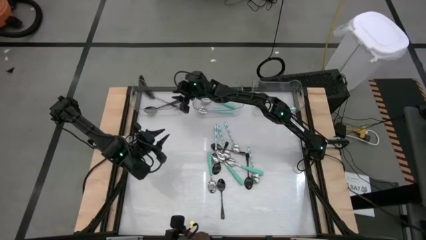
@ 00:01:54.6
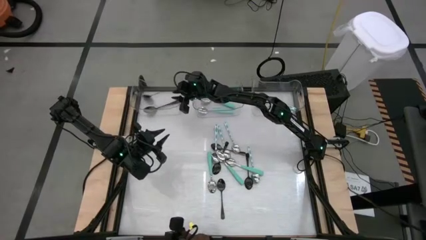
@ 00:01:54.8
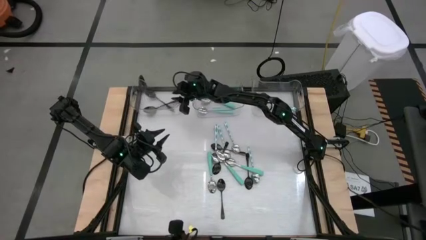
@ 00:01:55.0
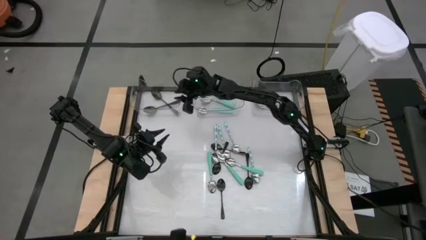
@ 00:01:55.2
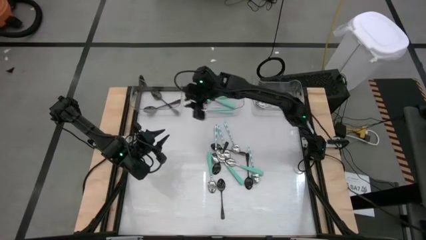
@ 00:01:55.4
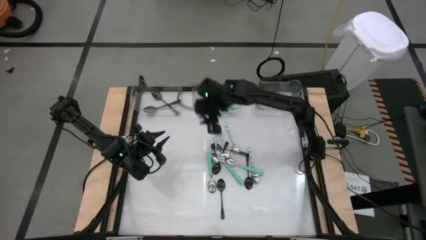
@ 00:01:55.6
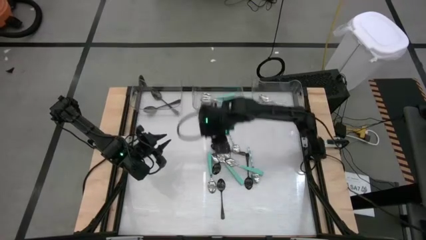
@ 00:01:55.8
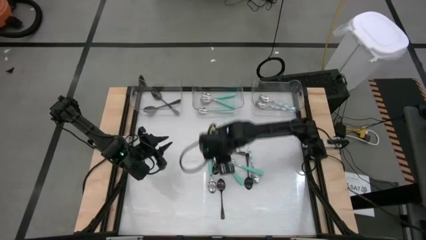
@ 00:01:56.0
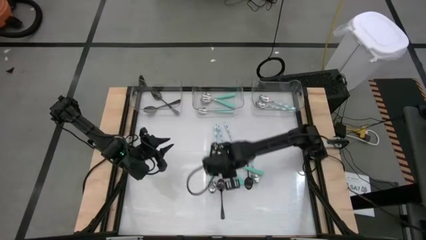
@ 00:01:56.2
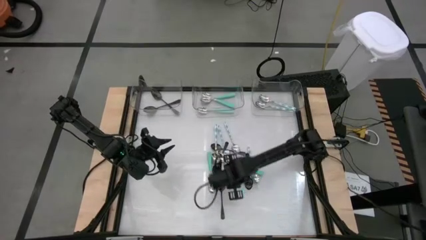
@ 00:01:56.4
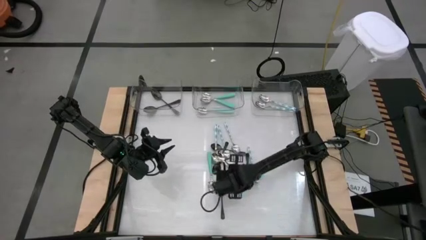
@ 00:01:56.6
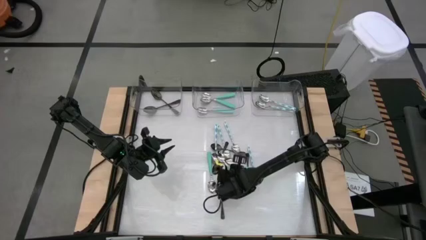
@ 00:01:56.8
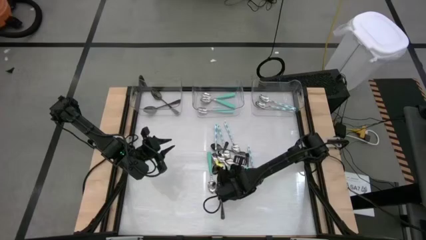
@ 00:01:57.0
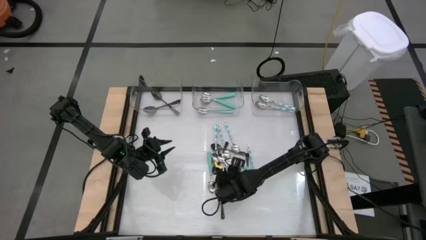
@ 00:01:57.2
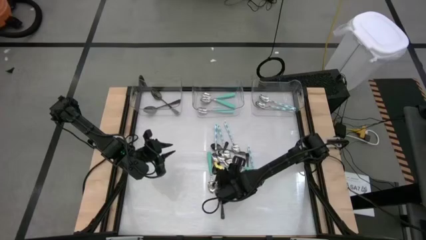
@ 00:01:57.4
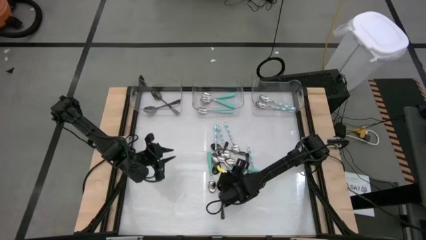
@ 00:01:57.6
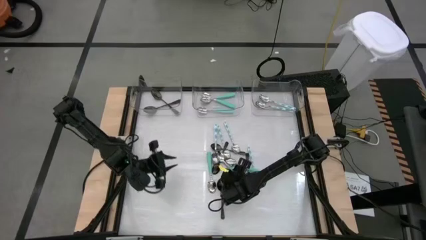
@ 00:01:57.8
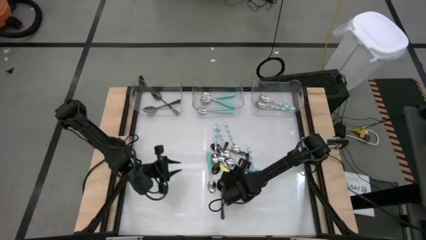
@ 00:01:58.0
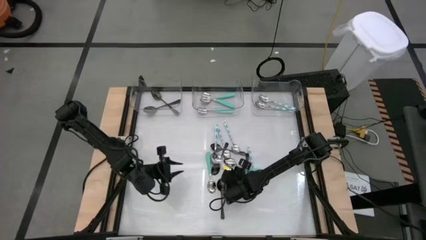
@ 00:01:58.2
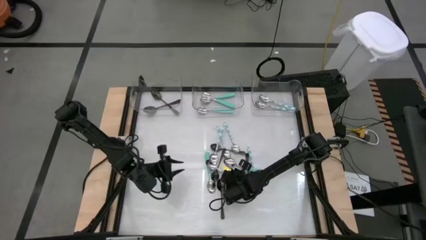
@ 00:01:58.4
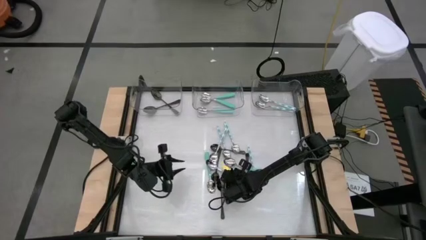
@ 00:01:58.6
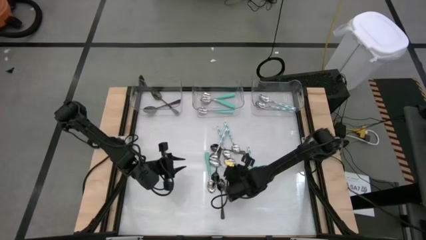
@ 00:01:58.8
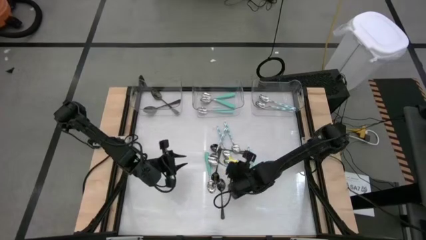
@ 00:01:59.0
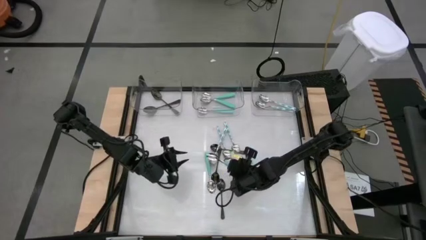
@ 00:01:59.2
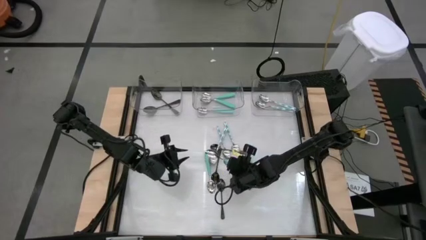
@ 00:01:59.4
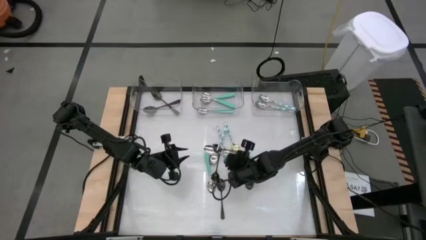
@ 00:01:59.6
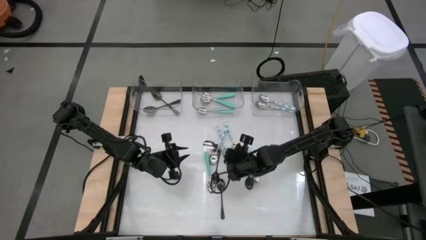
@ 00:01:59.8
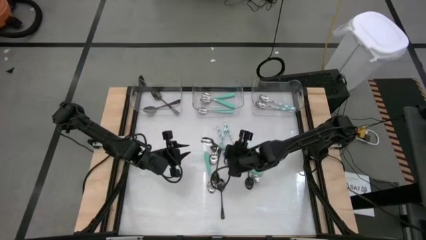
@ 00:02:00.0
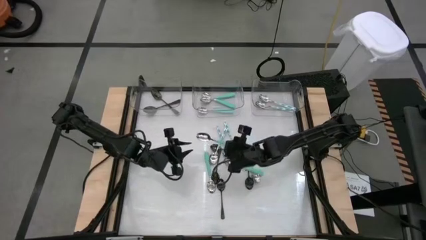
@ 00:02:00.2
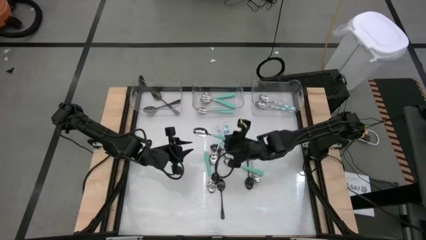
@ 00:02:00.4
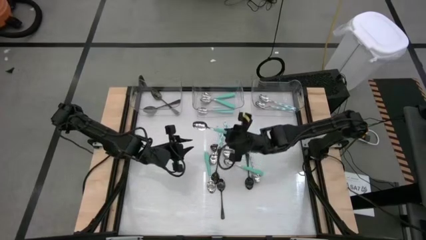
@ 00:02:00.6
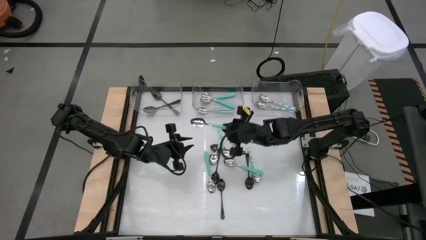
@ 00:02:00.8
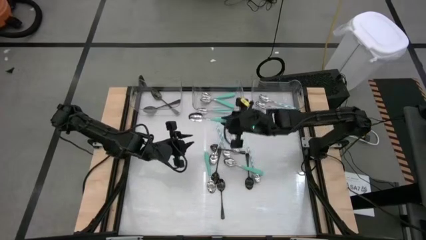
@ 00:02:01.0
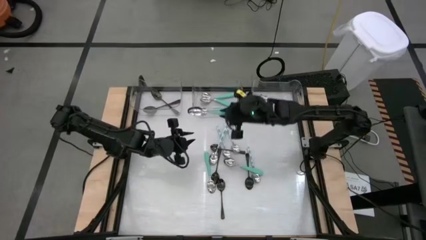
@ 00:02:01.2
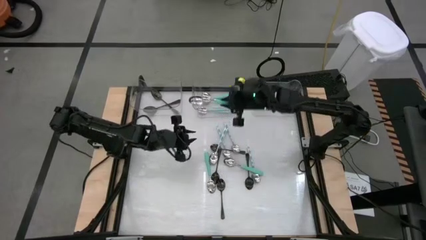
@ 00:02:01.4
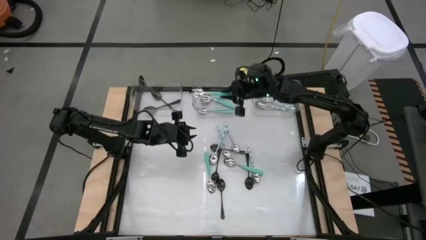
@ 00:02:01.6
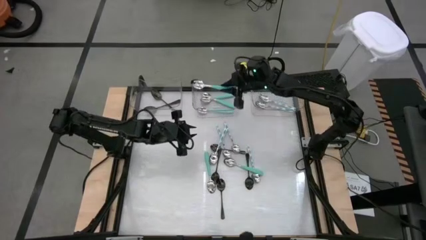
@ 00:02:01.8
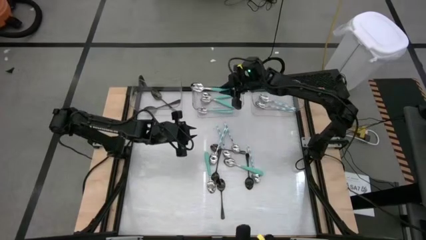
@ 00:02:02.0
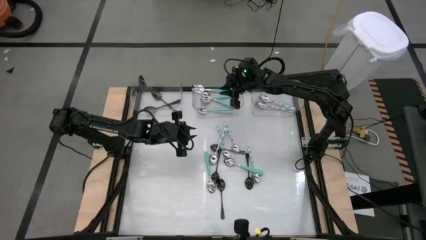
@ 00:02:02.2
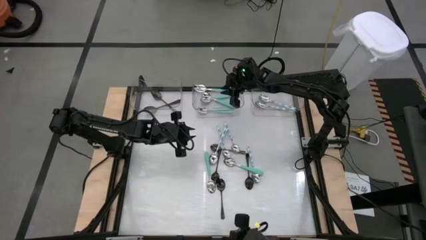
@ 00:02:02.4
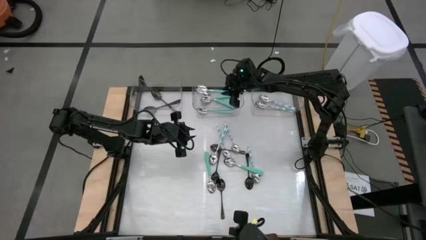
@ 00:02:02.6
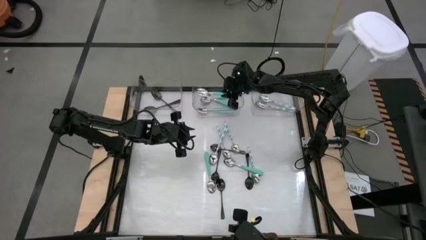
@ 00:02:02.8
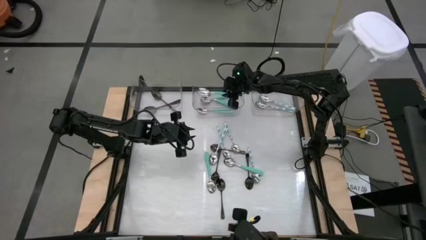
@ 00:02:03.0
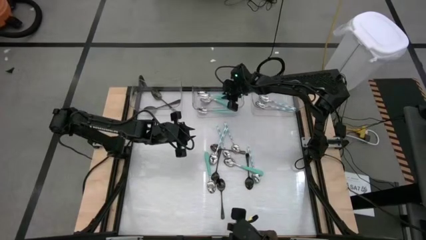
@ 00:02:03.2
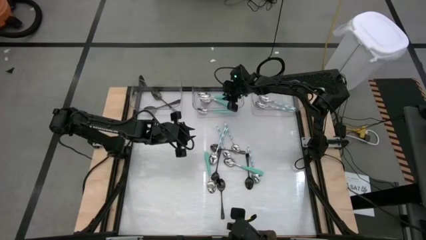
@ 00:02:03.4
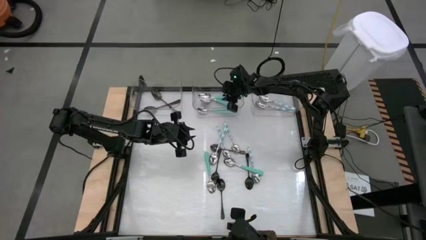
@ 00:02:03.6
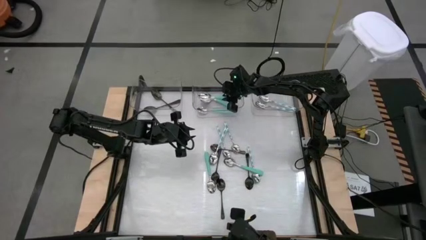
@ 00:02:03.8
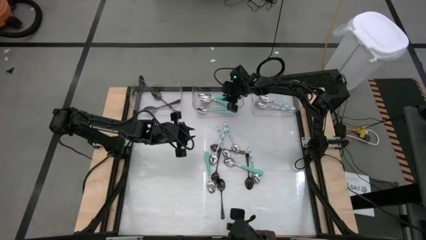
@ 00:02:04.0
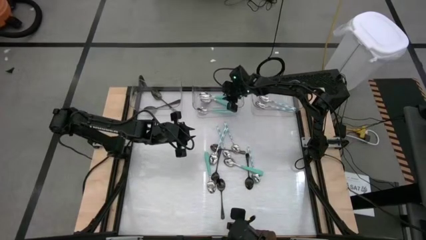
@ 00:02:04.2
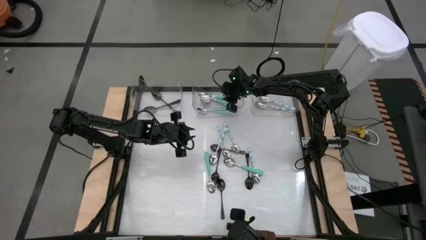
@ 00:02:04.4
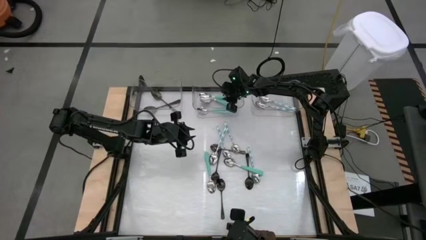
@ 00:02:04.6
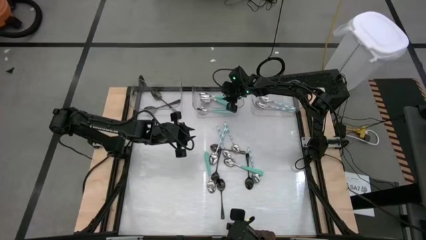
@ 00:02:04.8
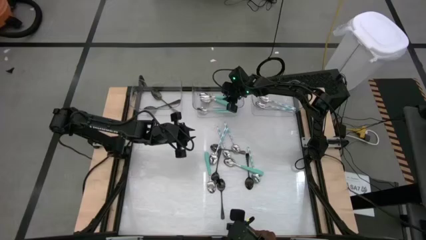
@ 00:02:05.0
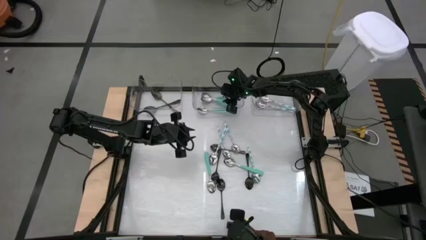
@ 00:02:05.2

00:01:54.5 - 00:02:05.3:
Task: Sort silverware by color (type)
Put the green spoon into the center transparent bin
